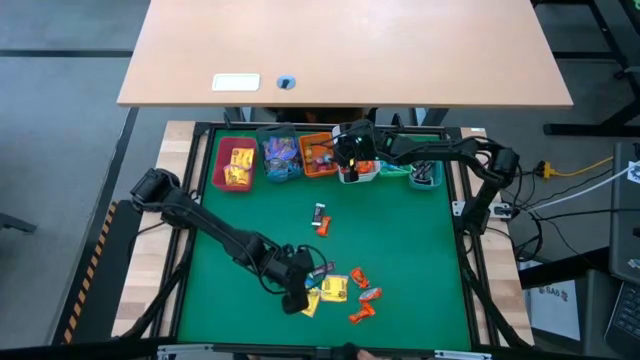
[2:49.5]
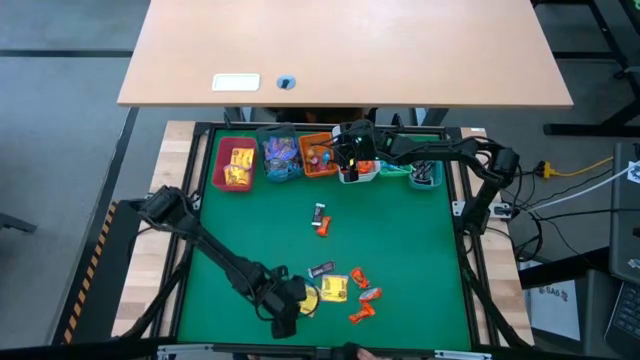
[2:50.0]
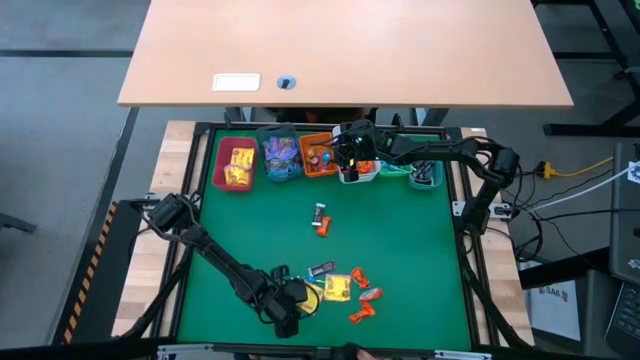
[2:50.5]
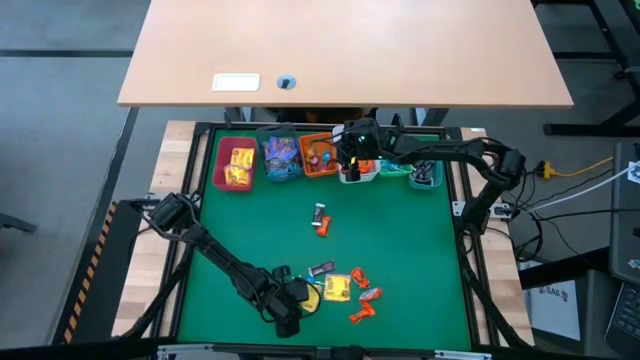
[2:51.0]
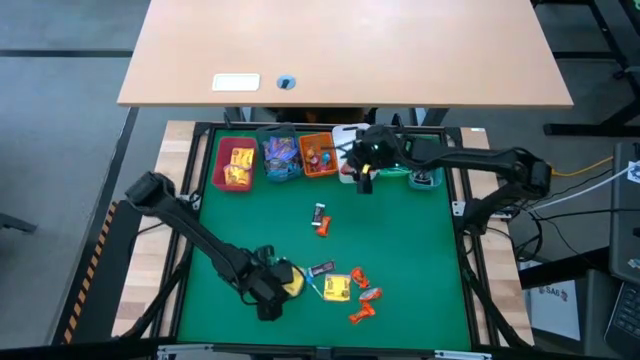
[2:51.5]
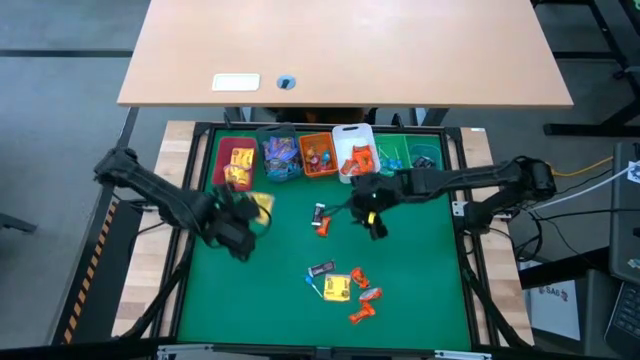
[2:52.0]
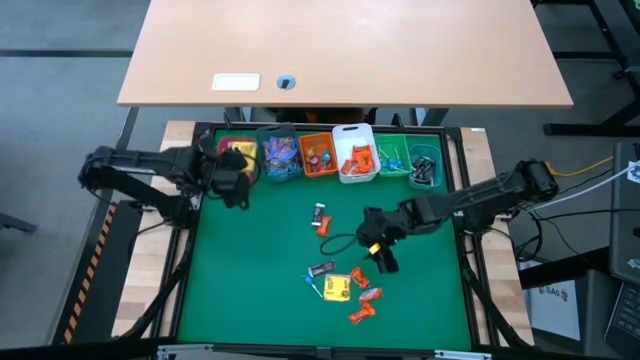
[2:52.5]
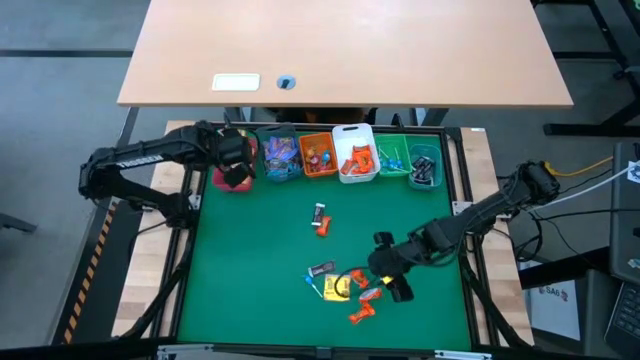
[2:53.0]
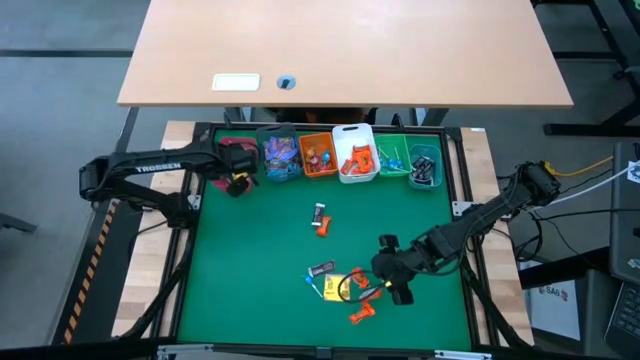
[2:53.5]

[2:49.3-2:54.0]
Task: Sort candy
Put the yellow candy into the red bin

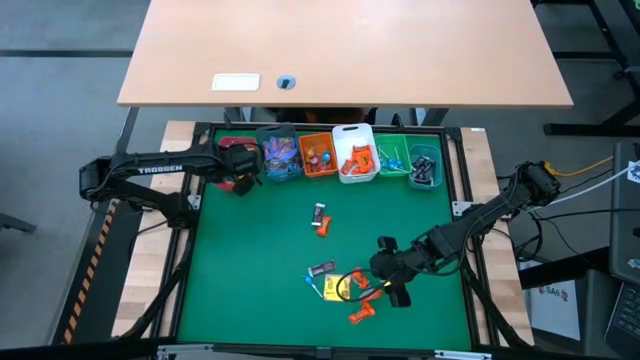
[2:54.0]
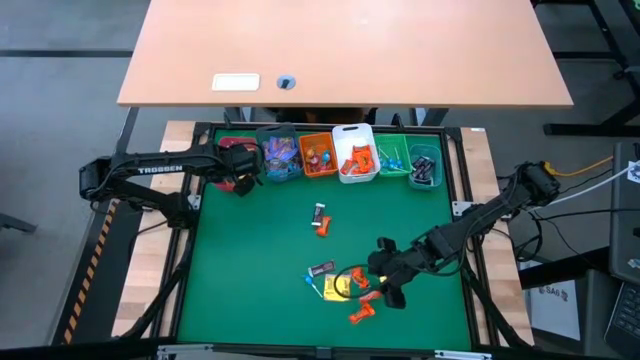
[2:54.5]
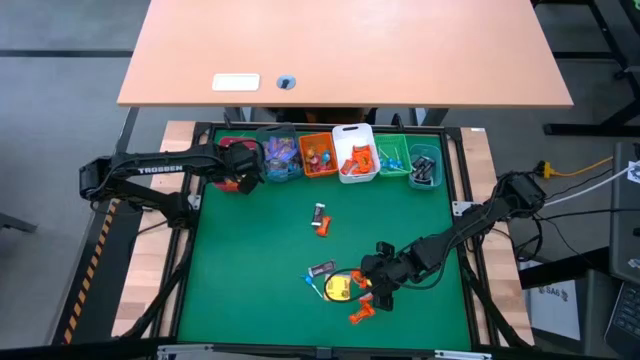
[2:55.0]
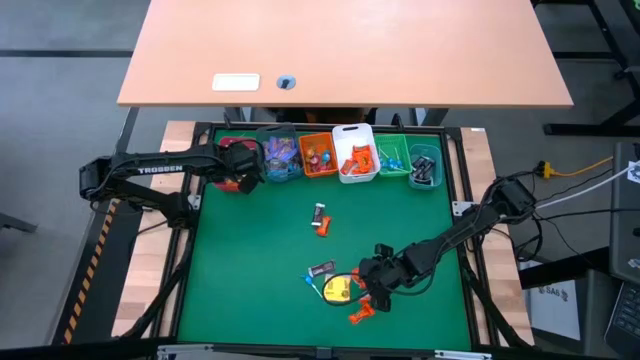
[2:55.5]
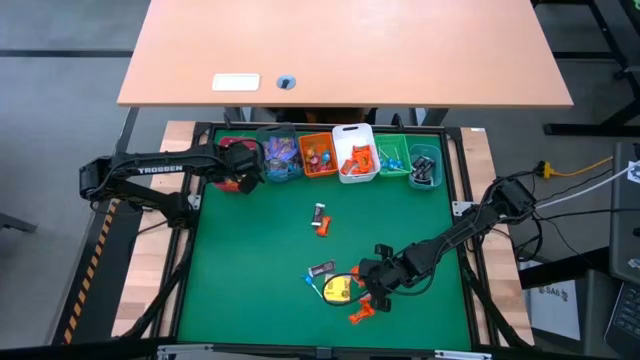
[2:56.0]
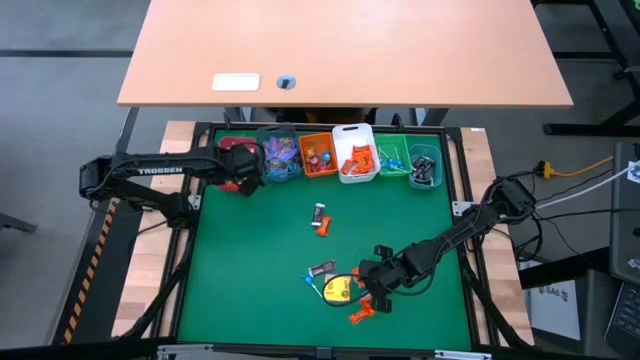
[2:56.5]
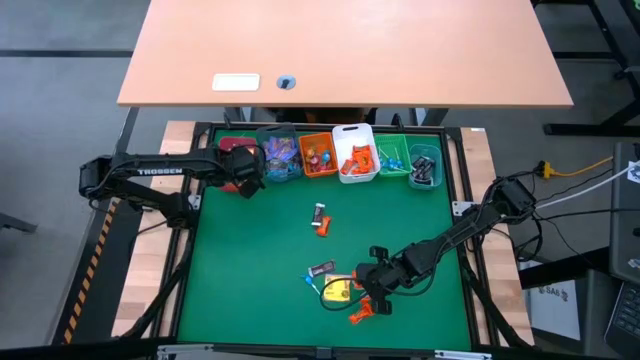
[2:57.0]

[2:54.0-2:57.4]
Put the orange chocolate into the white bin

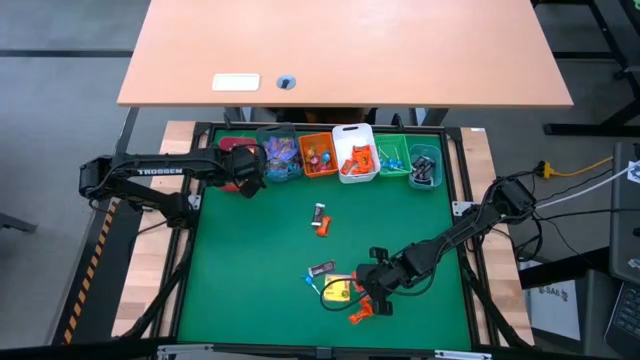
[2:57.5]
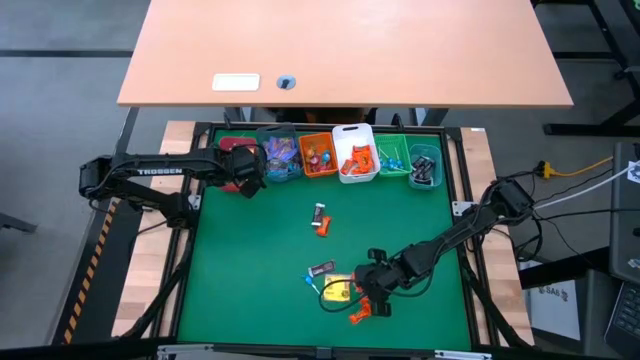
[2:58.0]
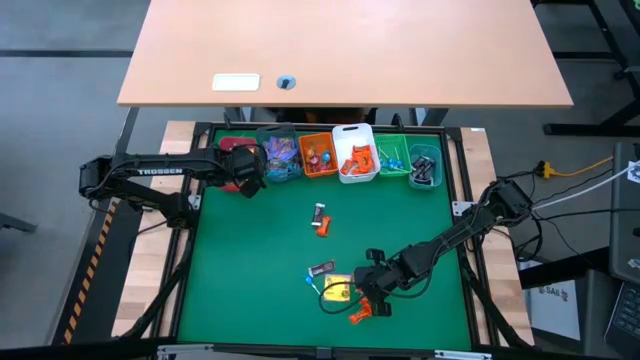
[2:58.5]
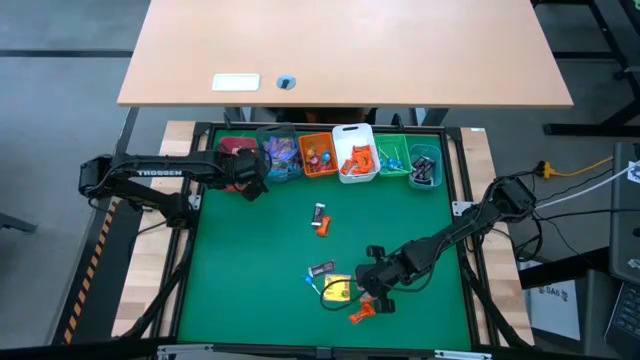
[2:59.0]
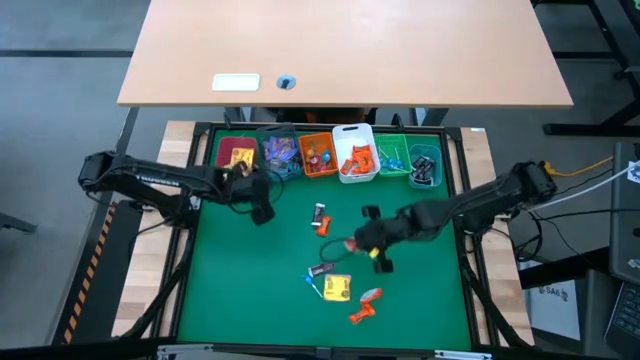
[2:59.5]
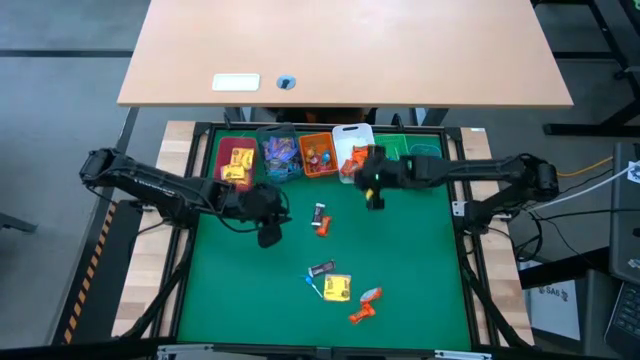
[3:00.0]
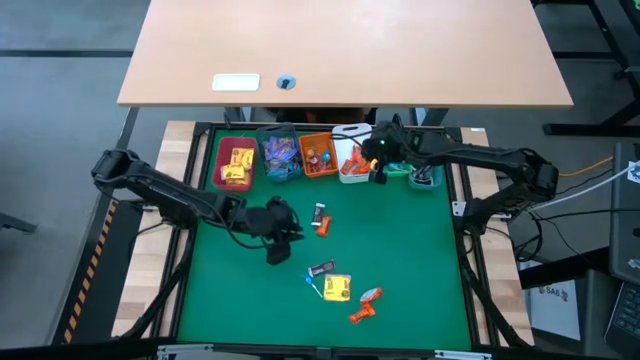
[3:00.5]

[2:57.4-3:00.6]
Put the orange chocolate into the white bin

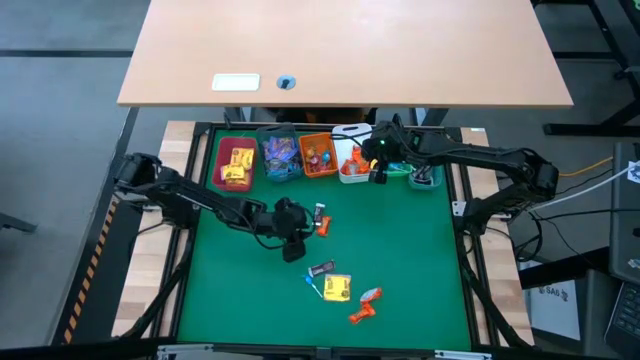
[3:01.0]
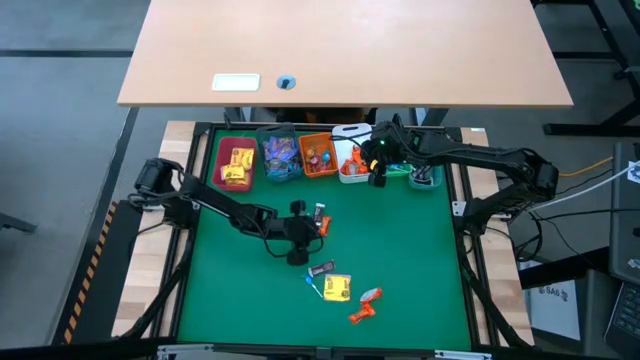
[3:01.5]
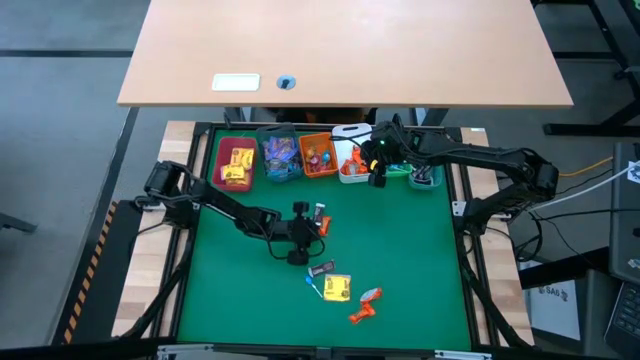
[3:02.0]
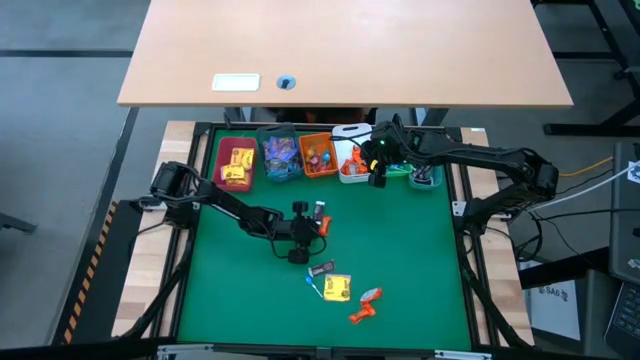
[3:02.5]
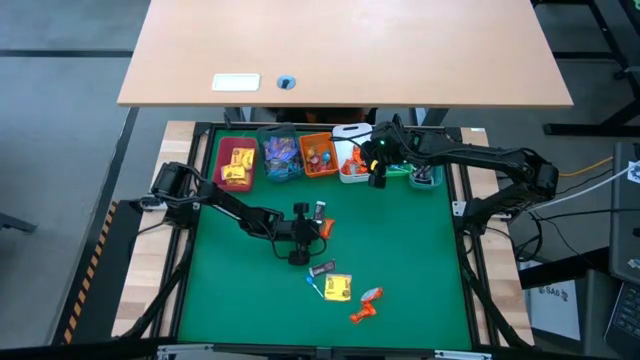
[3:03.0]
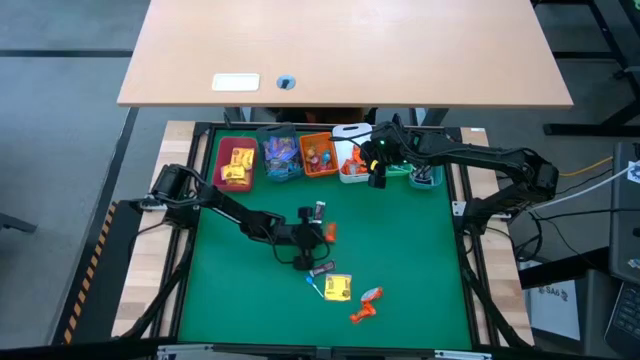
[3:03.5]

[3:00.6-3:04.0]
Put the orange chocolate into the white bin

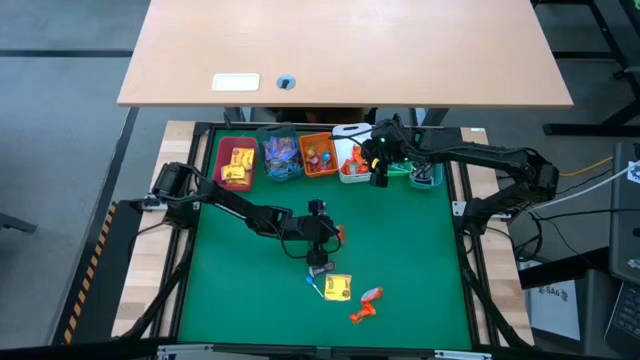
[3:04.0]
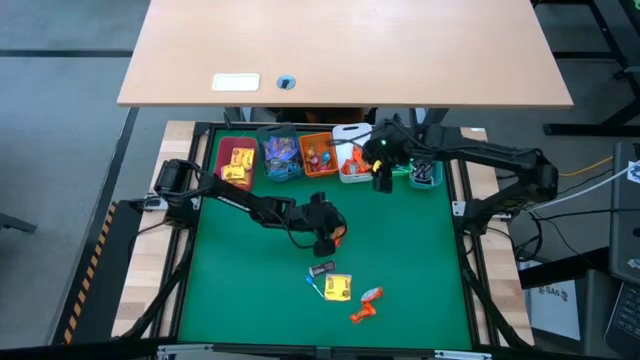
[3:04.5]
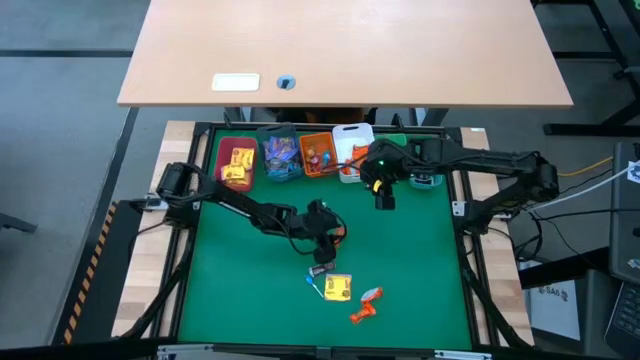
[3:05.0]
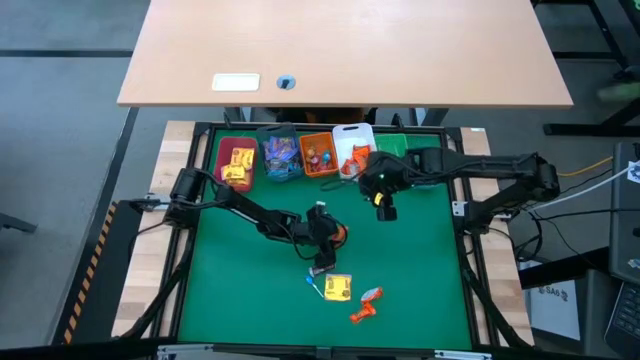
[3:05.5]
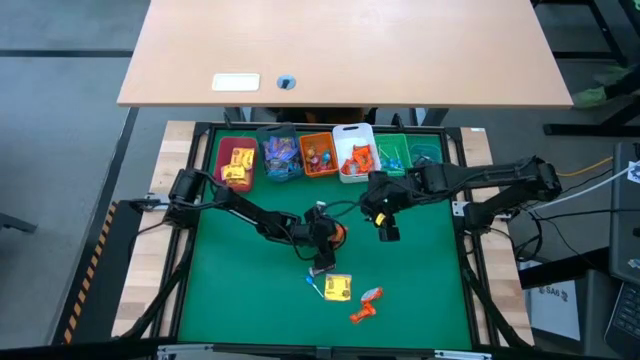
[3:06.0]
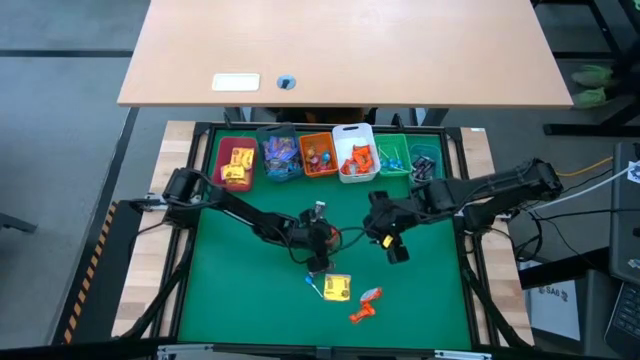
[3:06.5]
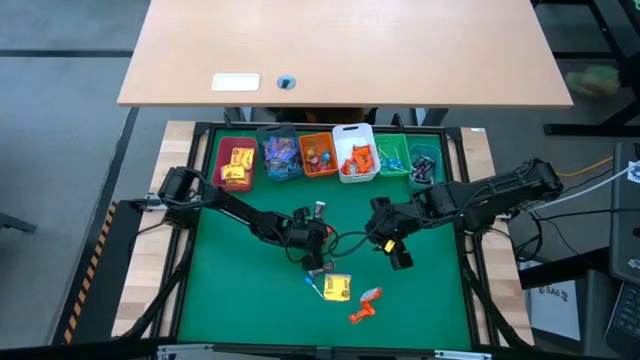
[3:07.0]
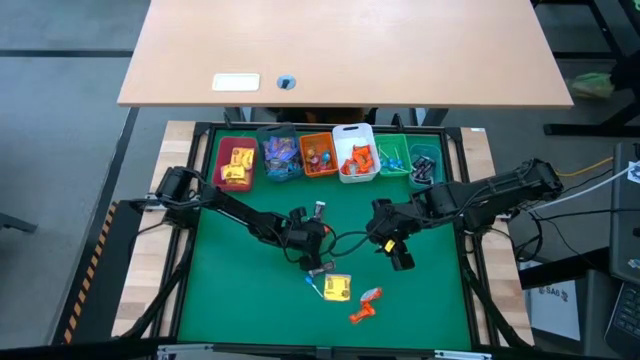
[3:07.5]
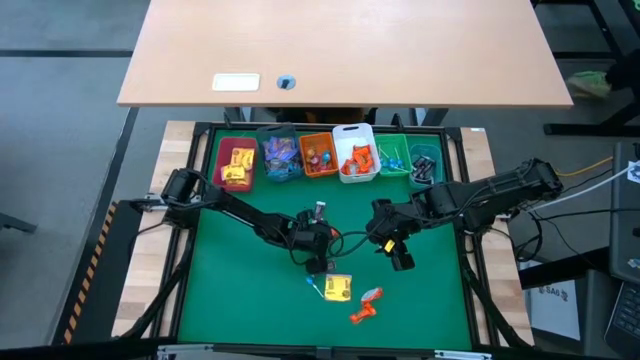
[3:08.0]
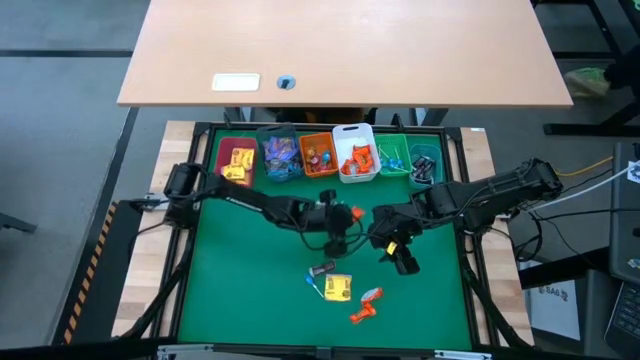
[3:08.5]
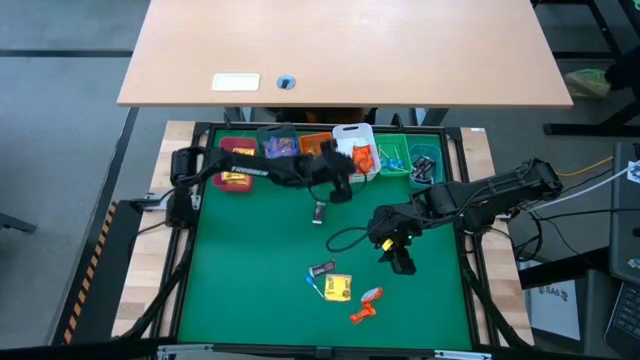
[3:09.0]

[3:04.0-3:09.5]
Put the orange chocolate into the white bin
